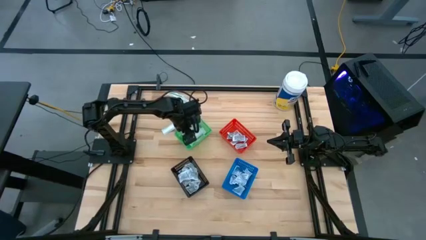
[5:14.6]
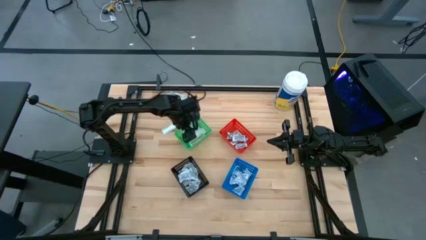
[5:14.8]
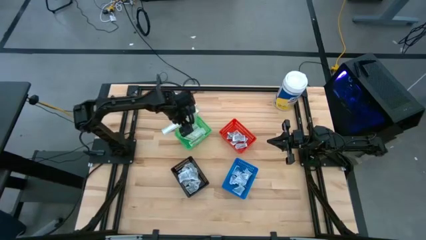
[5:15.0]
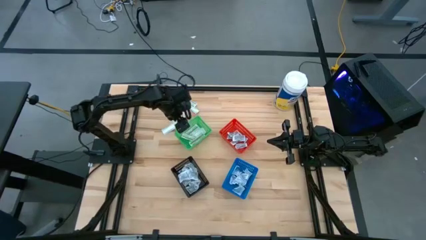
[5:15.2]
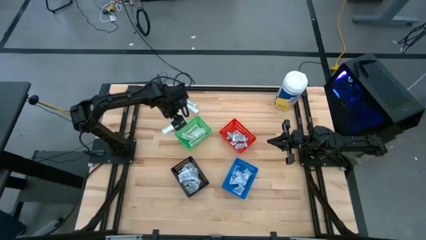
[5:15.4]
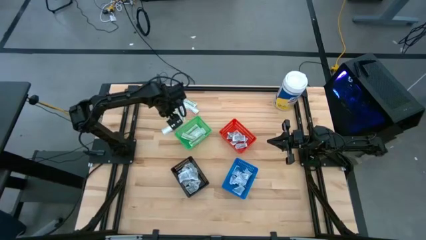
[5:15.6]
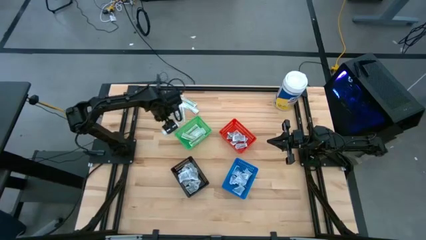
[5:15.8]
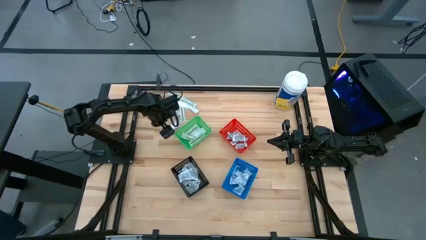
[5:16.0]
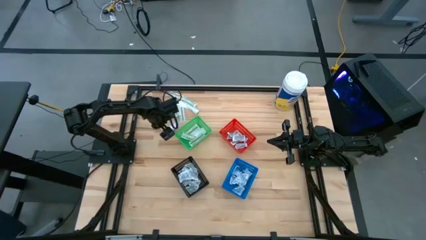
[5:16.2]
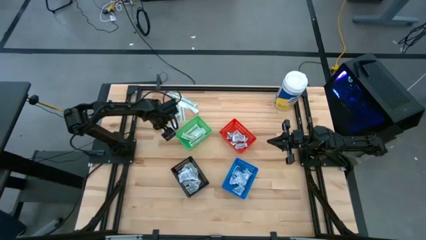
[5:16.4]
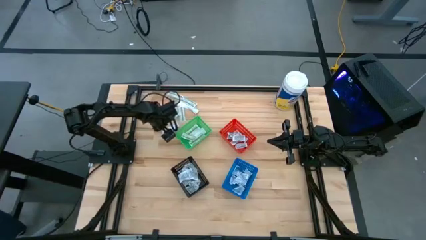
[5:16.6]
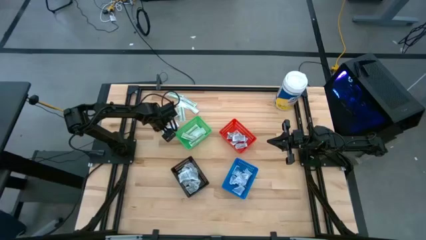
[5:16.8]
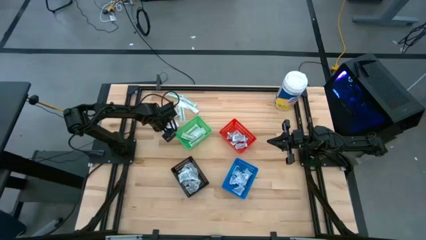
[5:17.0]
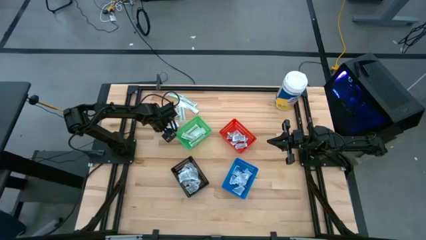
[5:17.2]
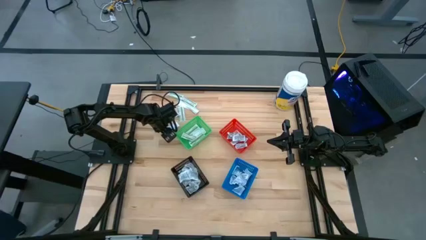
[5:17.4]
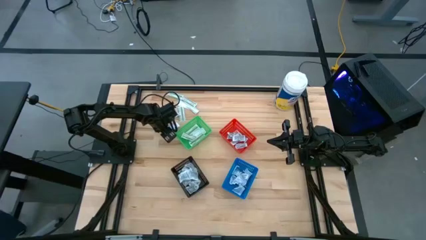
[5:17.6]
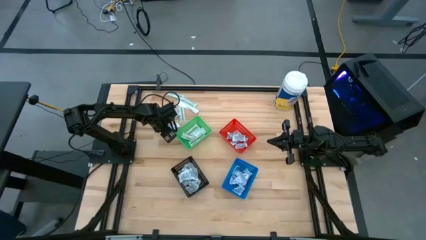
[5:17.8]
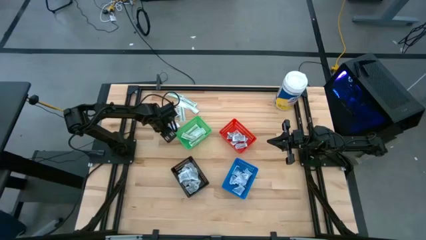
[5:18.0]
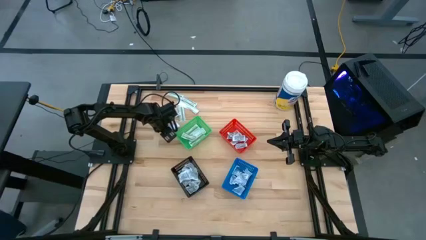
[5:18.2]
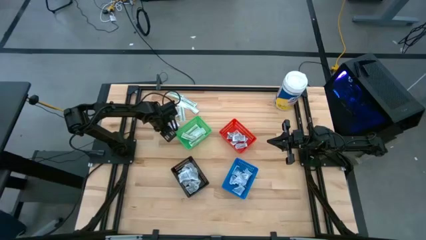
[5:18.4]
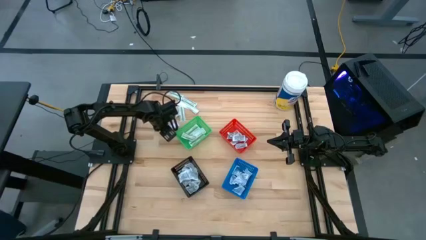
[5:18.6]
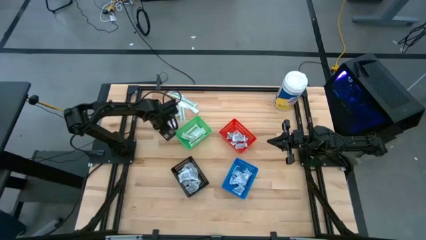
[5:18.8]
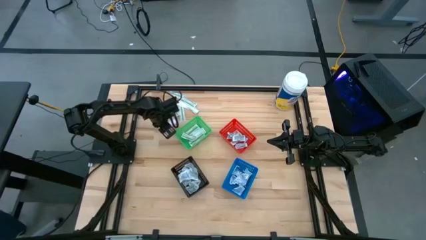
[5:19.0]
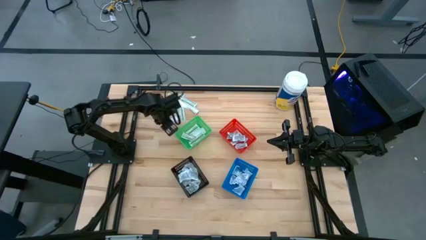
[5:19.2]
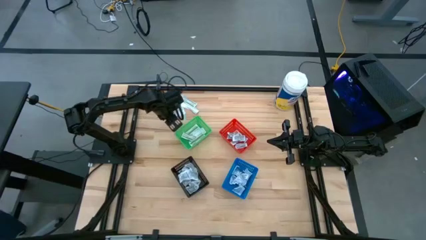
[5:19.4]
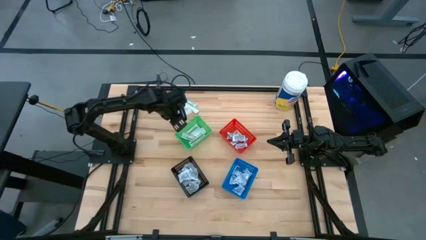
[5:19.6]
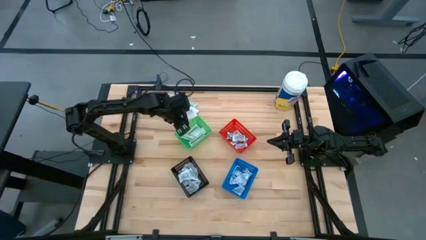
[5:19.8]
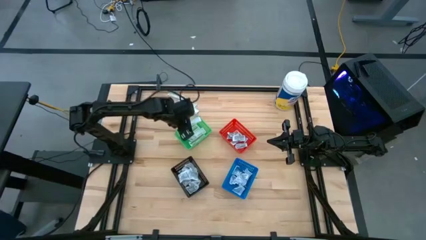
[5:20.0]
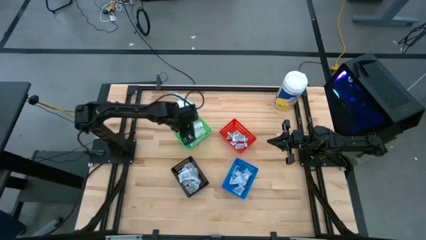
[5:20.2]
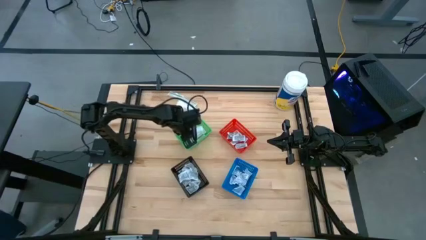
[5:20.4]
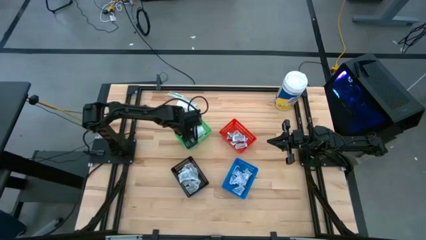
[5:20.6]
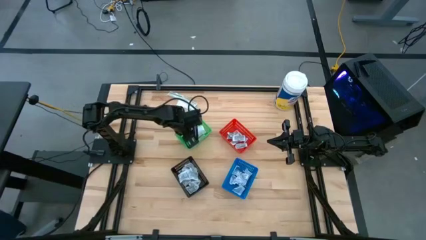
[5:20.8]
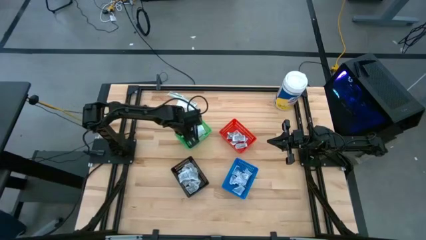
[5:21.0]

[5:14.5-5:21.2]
Task: Pick & Place First Aid Supplies
Put the green bandage pack into the green bin

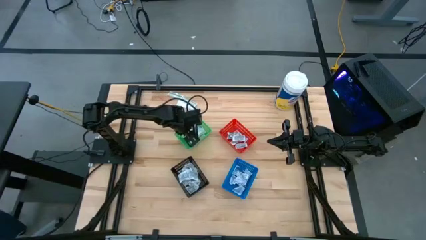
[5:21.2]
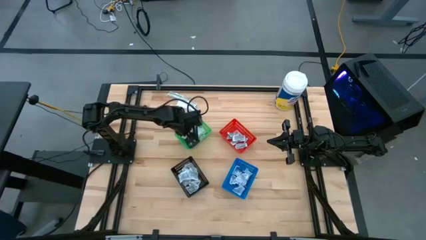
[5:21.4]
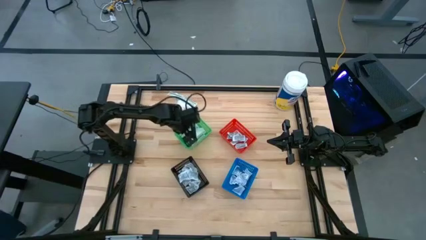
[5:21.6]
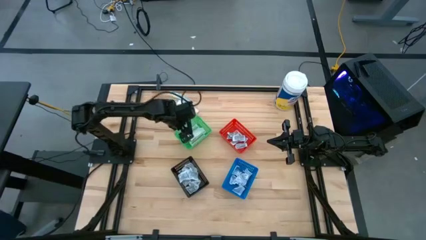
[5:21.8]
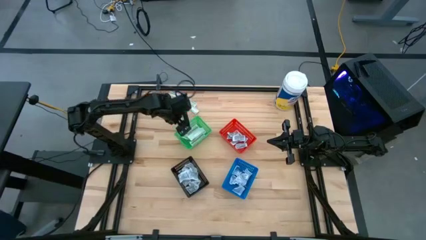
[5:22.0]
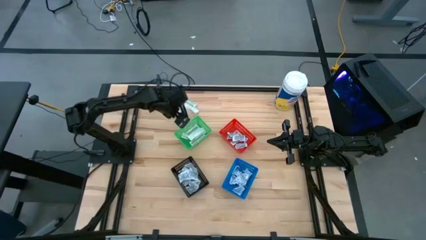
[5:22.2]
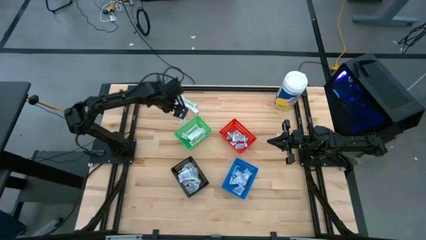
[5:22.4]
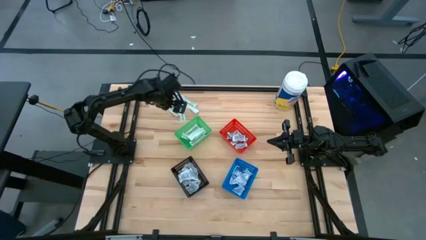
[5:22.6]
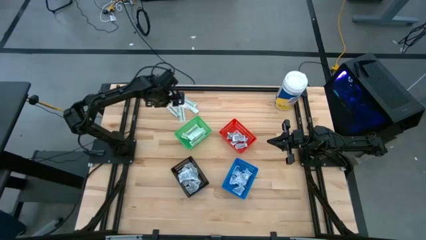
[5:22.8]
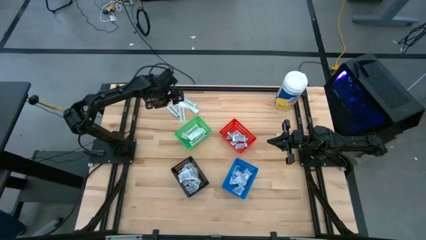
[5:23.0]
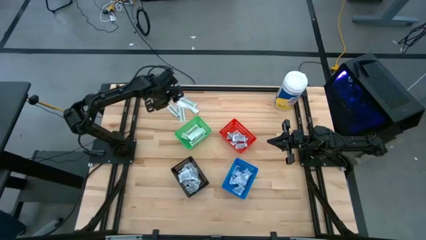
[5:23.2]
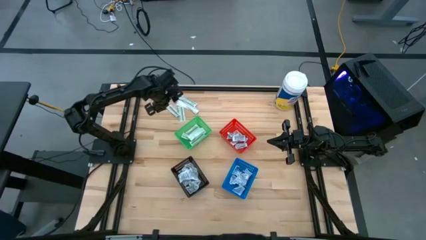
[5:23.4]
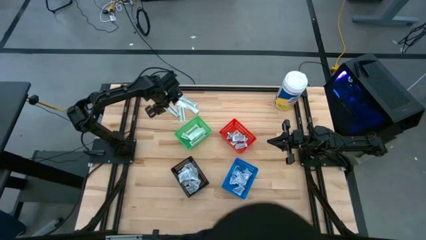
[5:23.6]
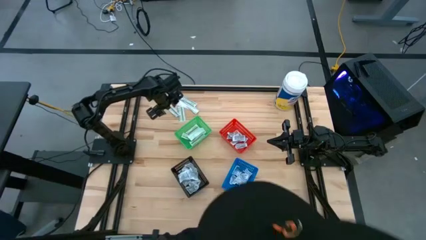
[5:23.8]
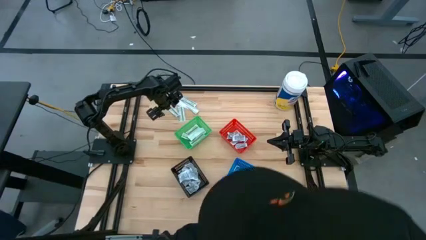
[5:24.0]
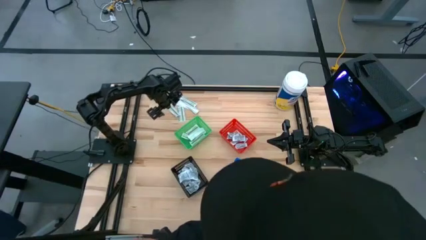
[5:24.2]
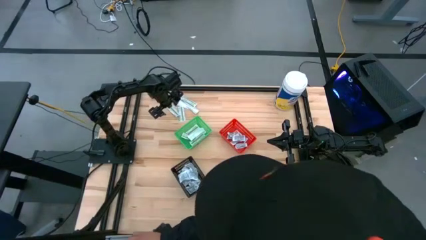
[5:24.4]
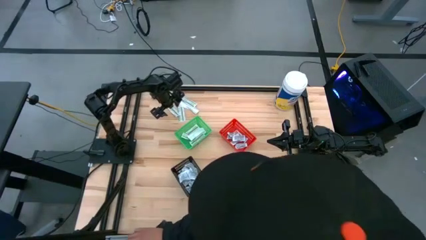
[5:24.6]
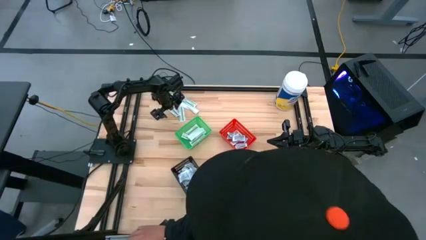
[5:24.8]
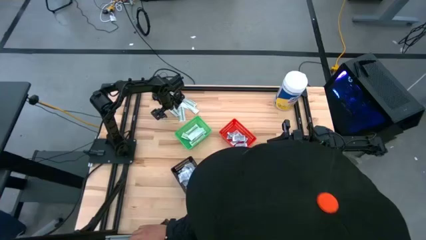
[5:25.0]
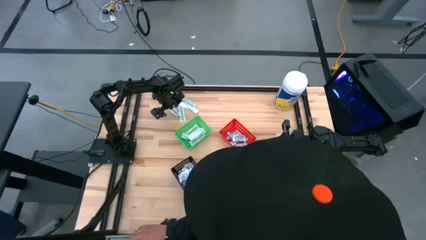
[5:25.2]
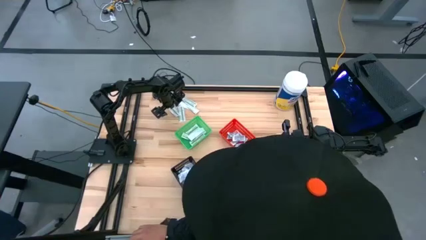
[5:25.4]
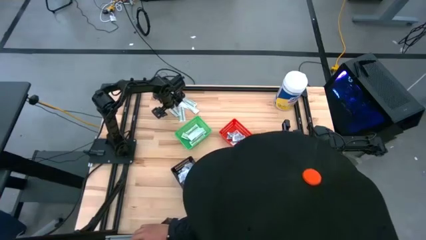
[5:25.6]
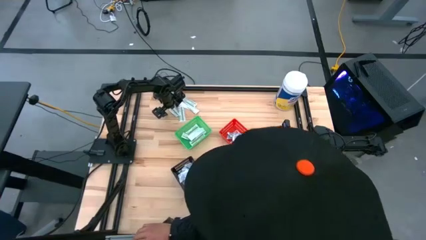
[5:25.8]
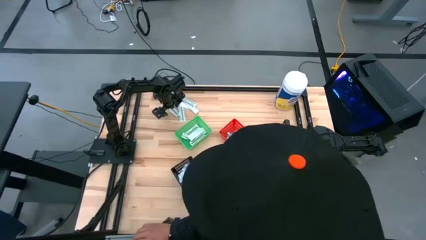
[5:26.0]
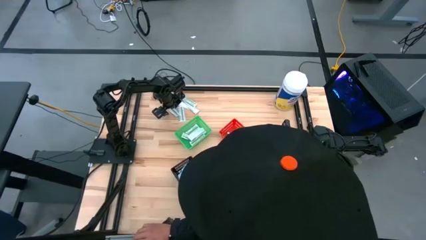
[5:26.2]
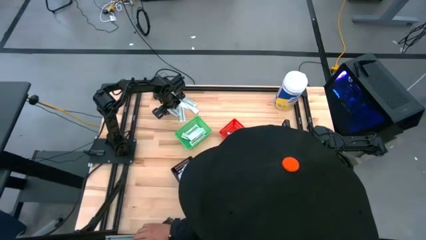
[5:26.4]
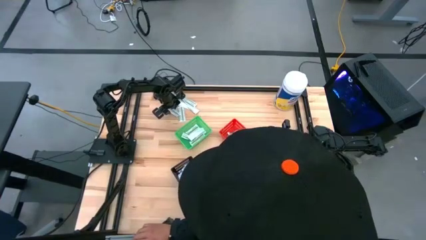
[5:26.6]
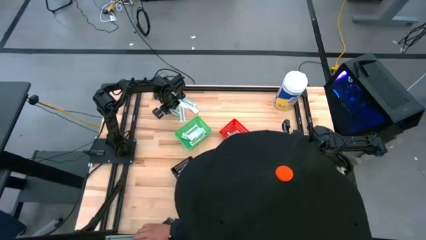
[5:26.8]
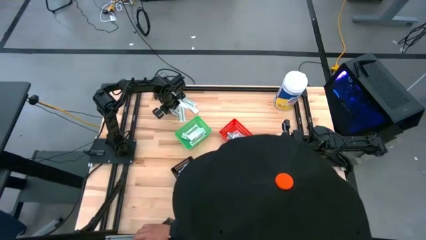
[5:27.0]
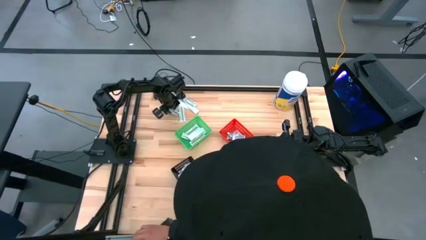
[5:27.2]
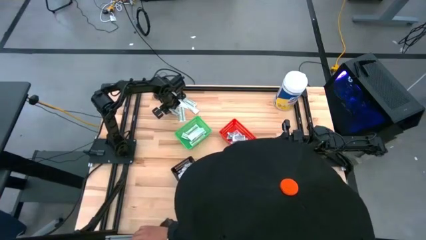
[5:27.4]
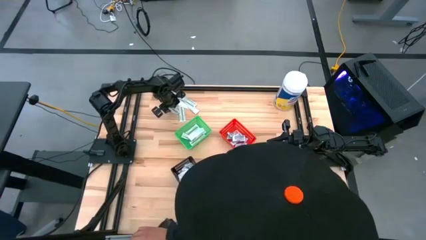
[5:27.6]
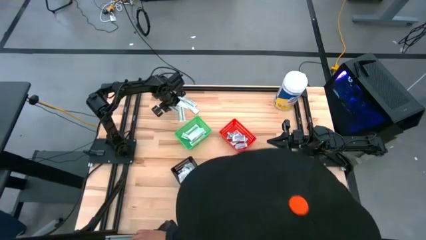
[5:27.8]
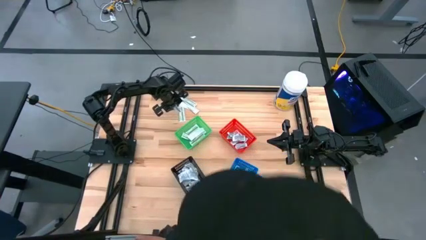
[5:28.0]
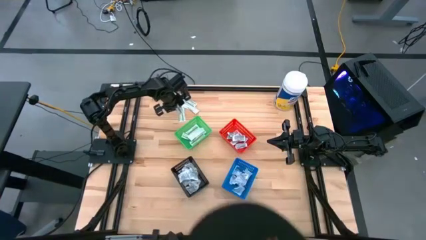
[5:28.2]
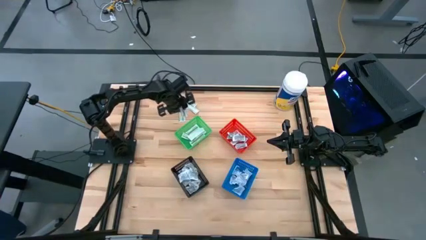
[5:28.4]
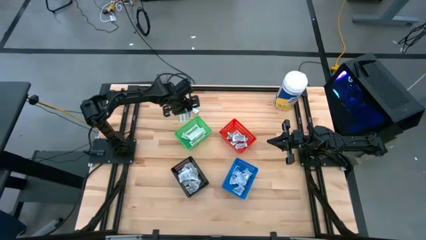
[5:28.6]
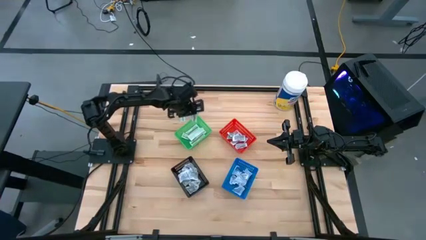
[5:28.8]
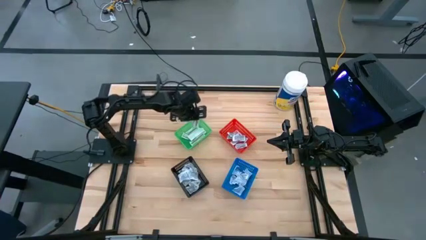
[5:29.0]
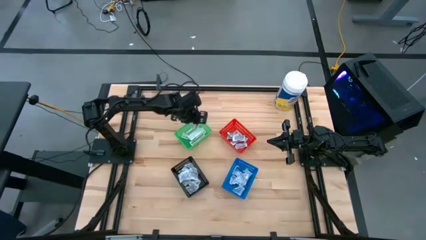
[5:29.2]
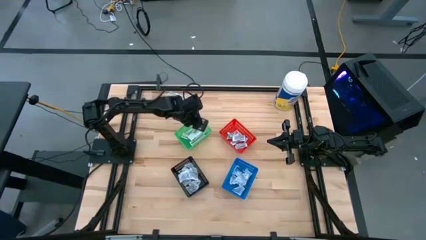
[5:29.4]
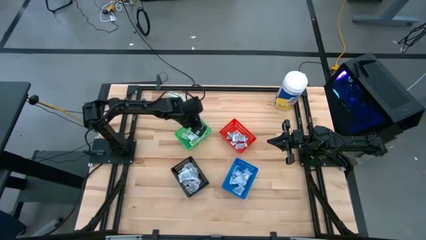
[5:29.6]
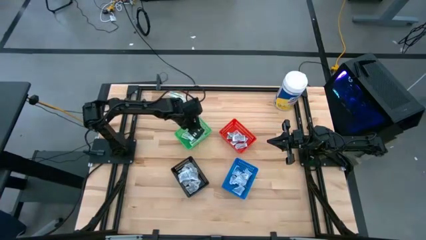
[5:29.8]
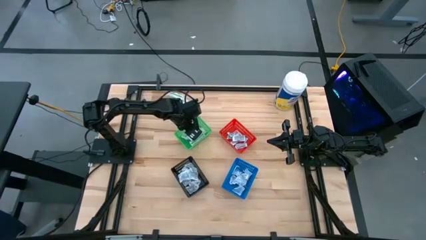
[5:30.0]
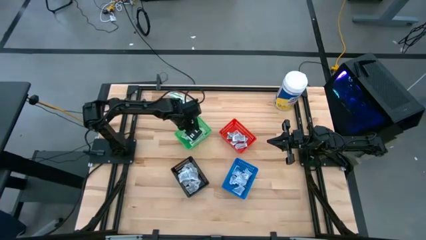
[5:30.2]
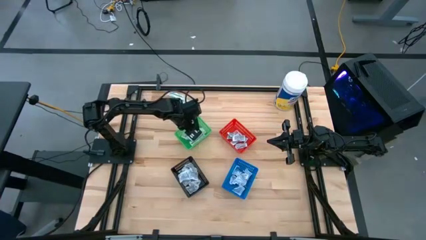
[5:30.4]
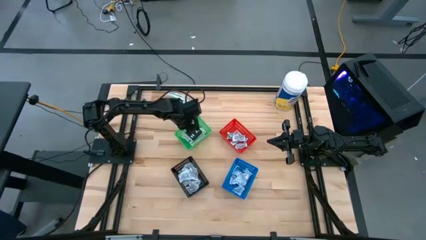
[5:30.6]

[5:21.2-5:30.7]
Put the green bandage pack into the green bin
